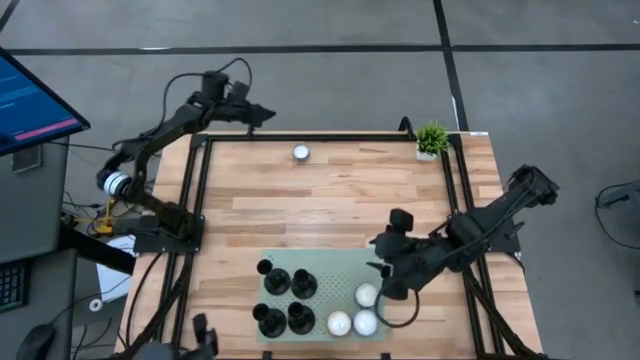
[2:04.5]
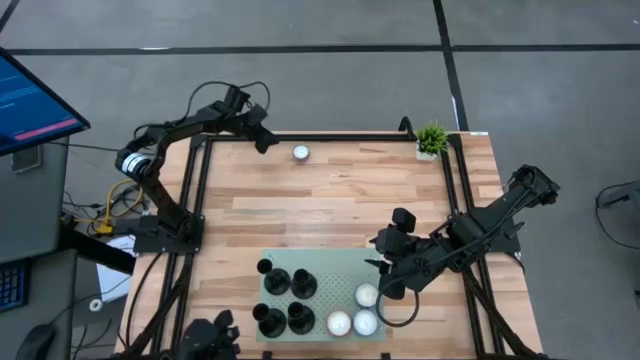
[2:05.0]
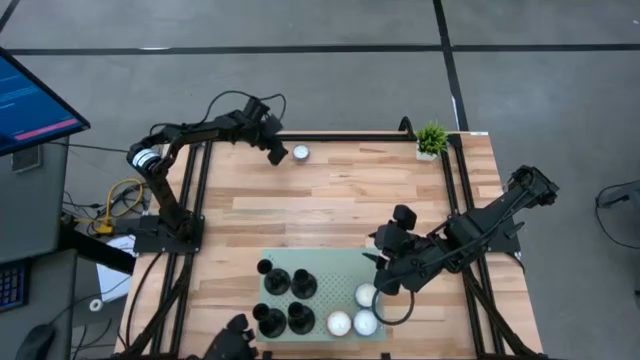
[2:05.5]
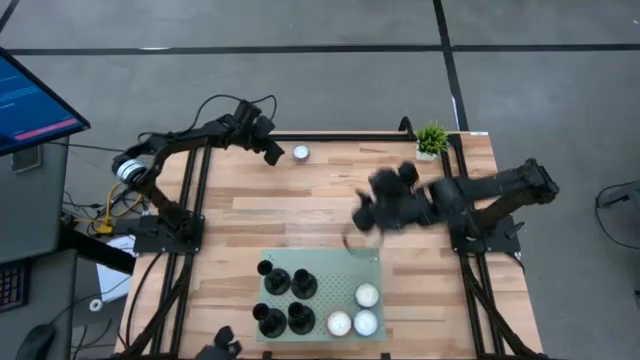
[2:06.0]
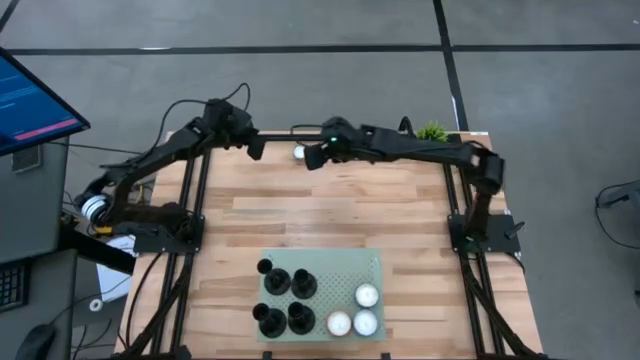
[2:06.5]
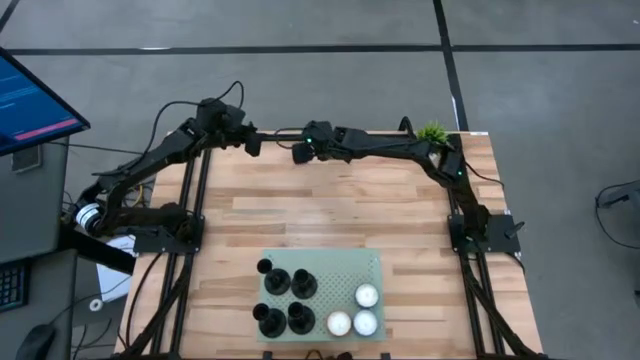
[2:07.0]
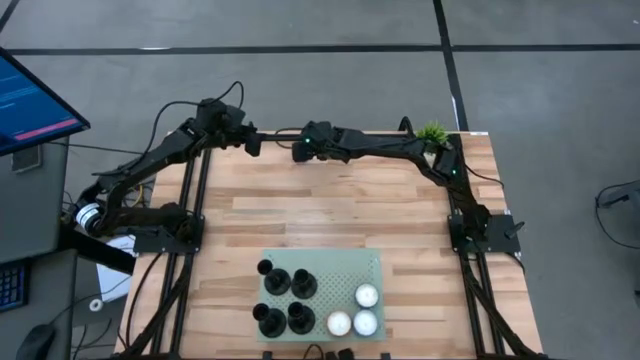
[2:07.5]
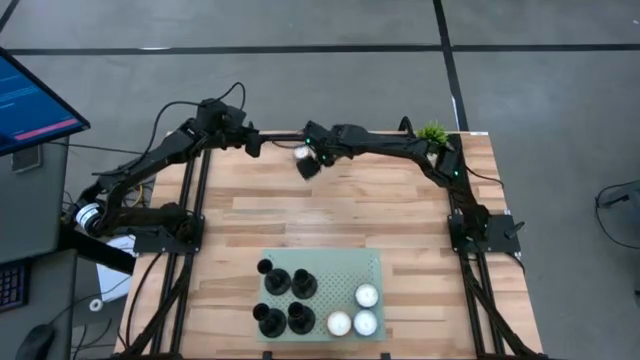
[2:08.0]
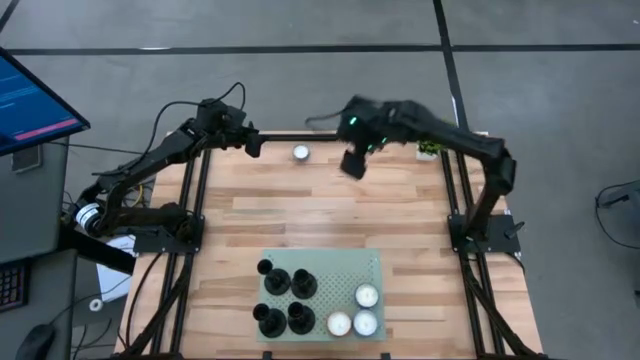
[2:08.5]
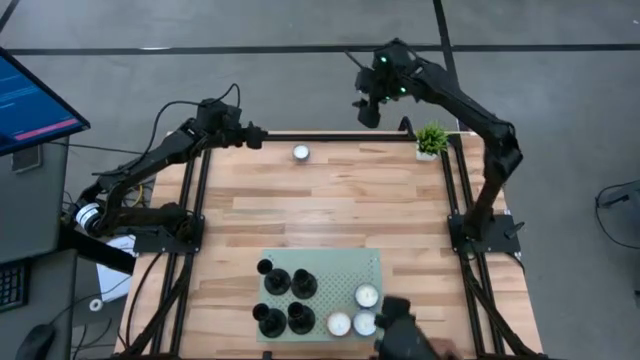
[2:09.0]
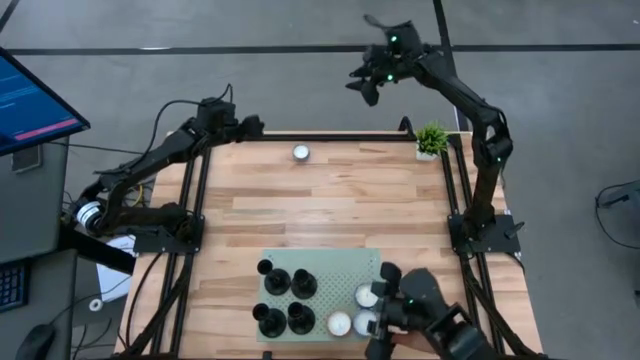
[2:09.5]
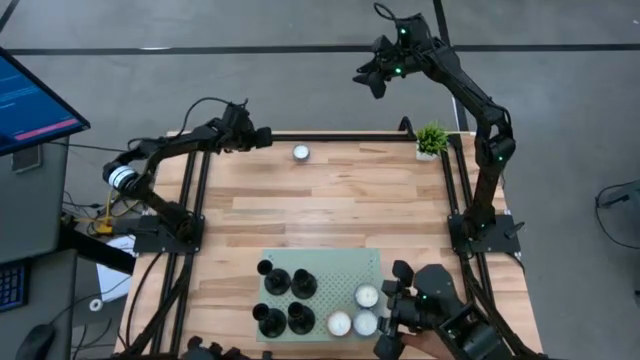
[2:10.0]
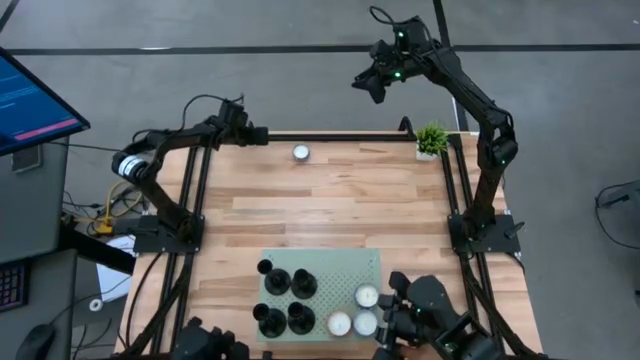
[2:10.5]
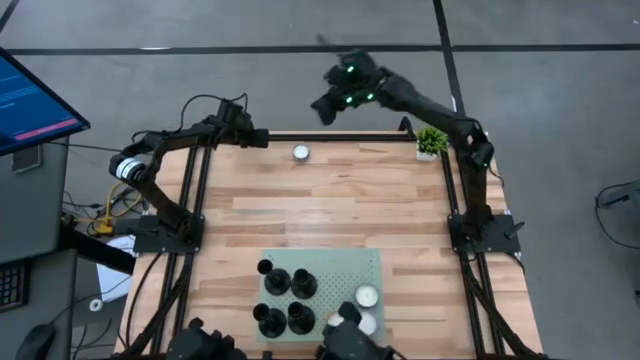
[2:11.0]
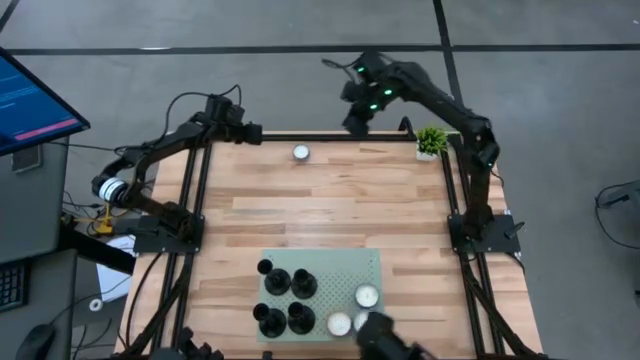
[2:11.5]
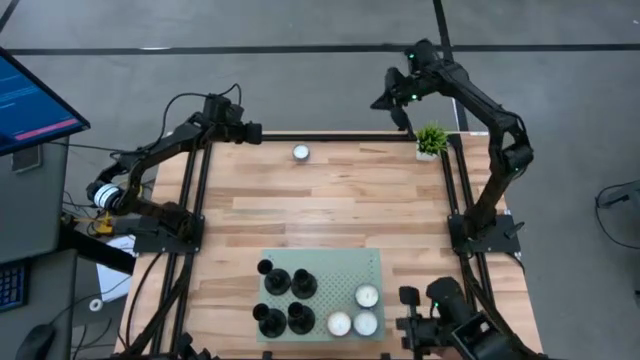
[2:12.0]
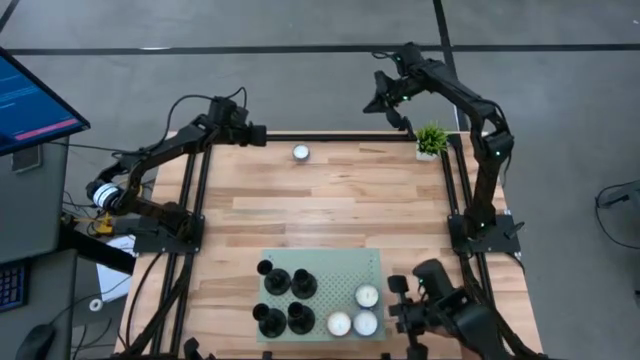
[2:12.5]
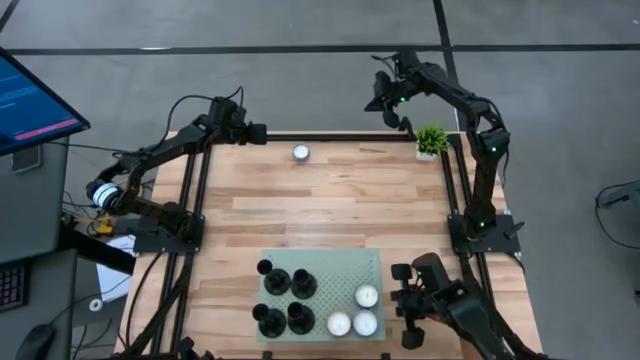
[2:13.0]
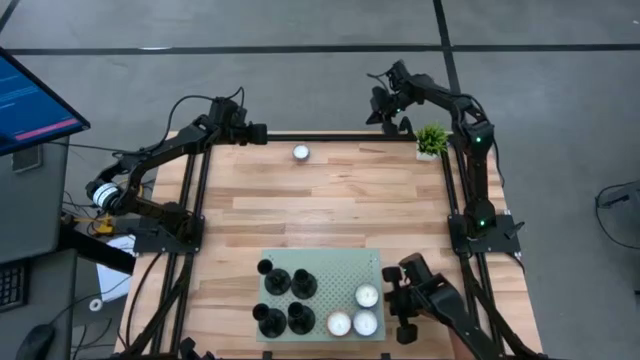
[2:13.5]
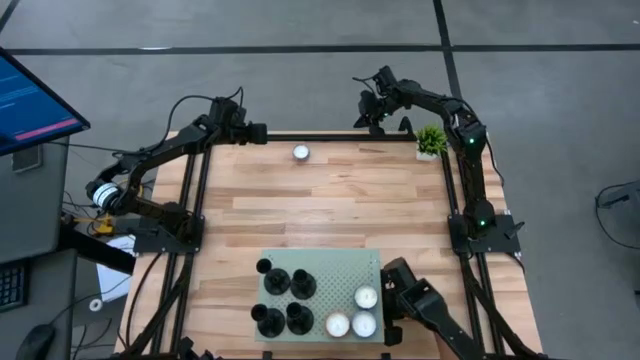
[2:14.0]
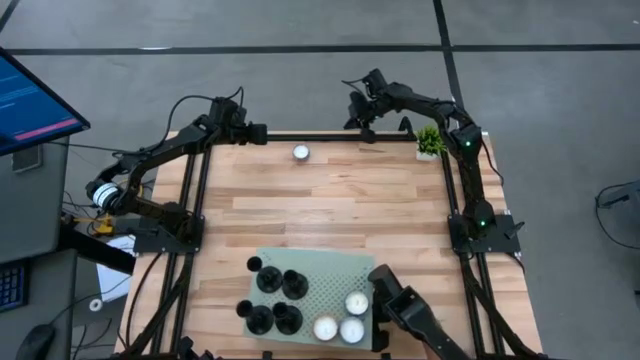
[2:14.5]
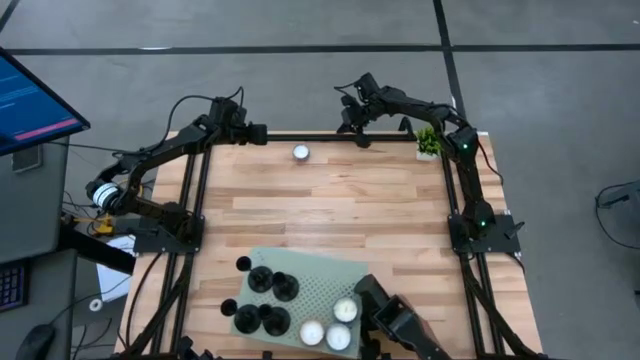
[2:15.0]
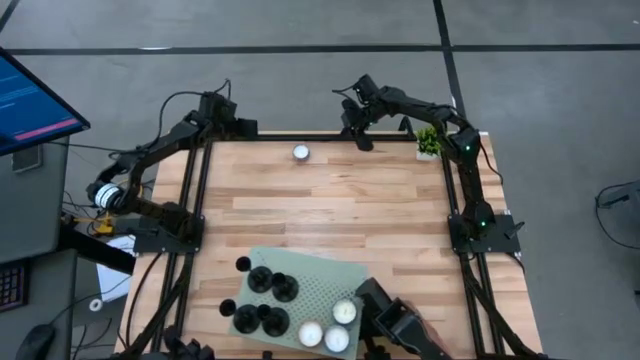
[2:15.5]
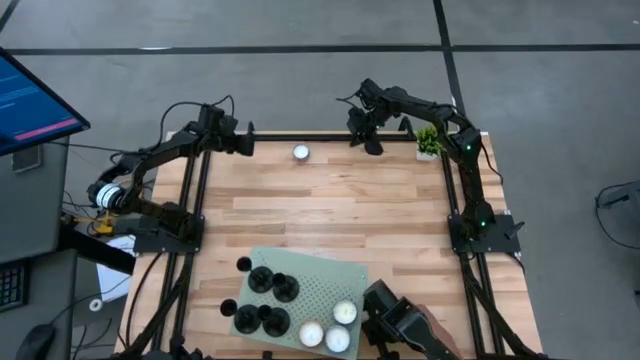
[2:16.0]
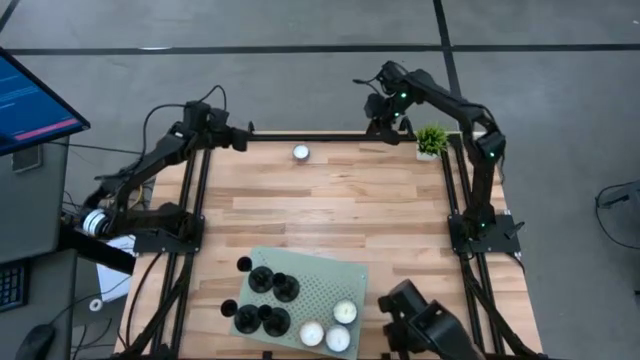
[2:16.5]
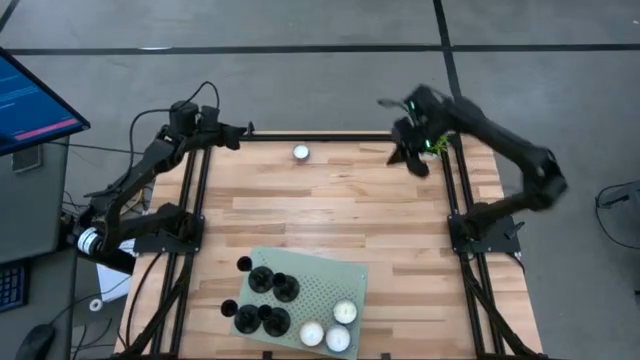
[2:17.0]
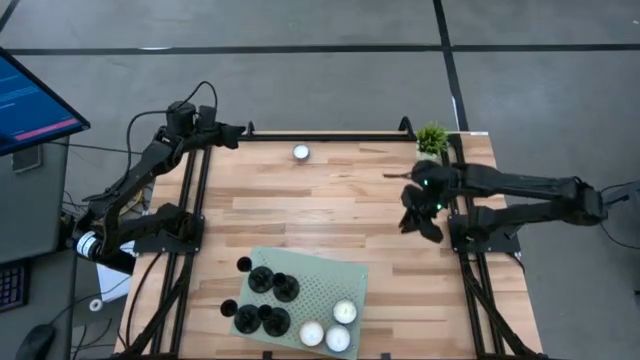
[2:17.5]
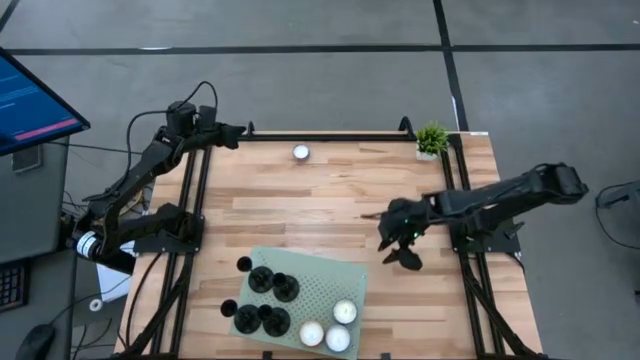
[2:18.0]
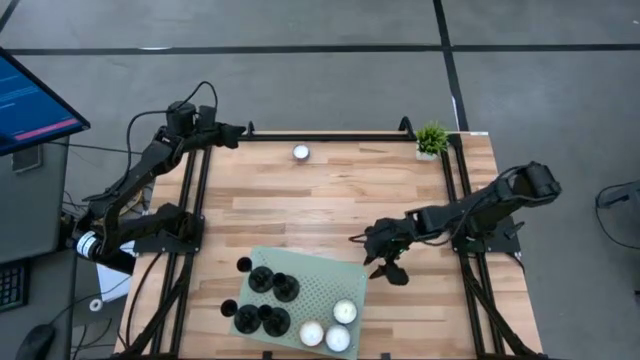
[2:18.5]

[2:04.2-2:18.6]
Task: Stock candles on shelf
Adjust the shelf

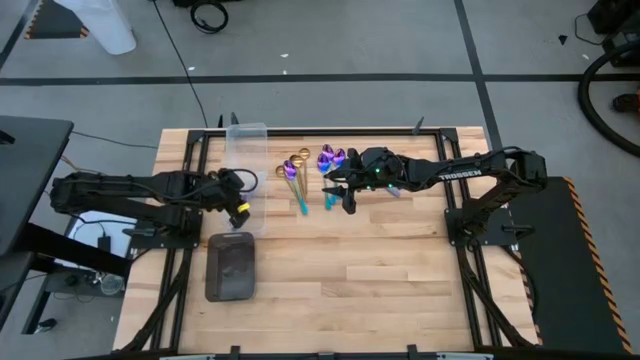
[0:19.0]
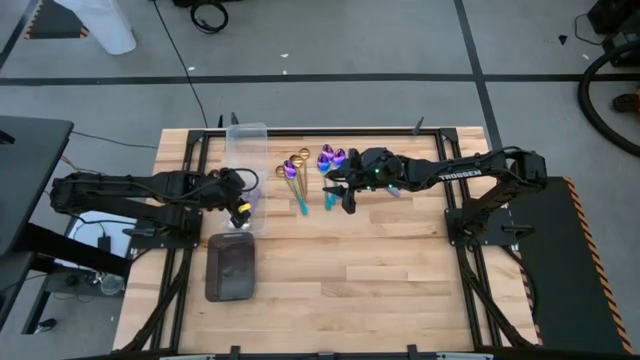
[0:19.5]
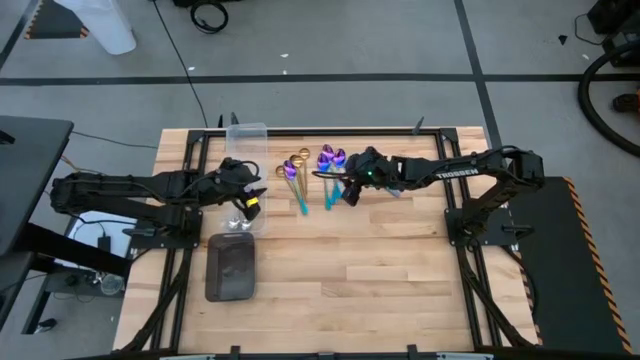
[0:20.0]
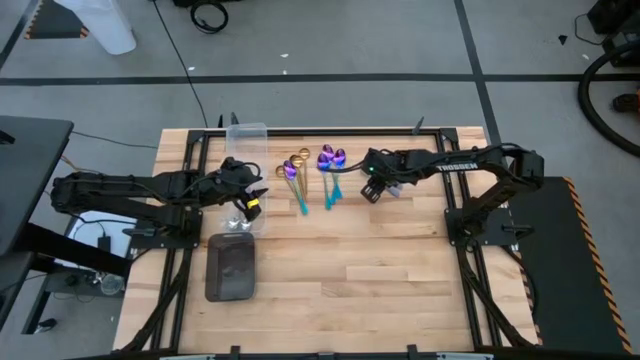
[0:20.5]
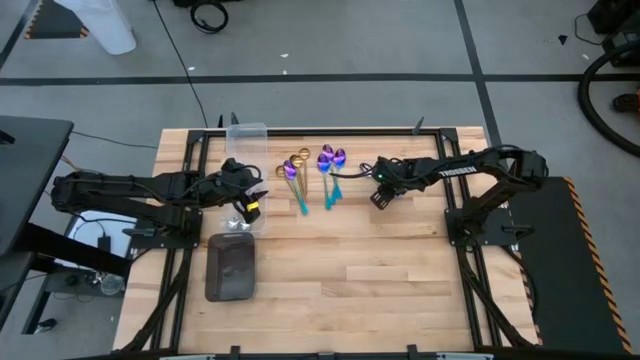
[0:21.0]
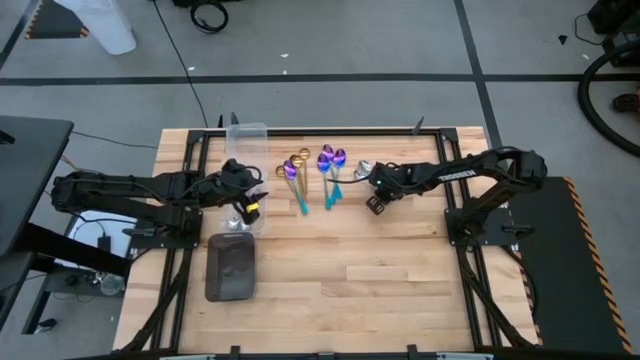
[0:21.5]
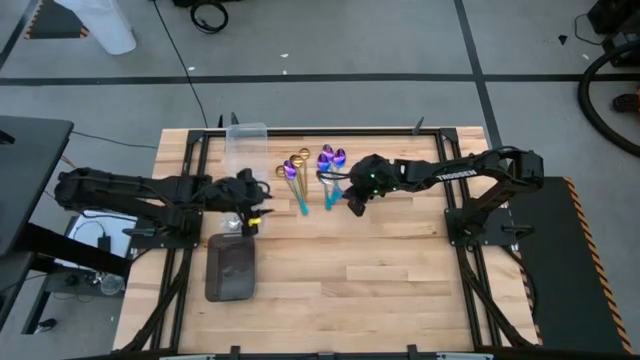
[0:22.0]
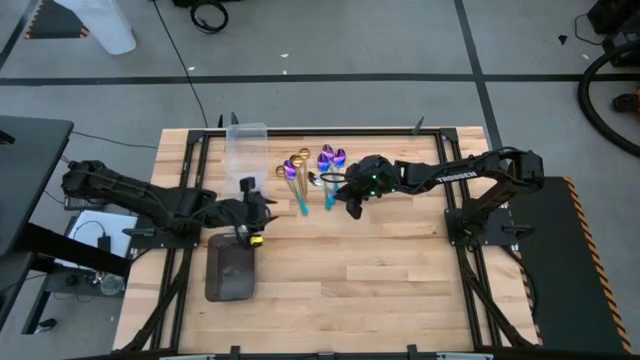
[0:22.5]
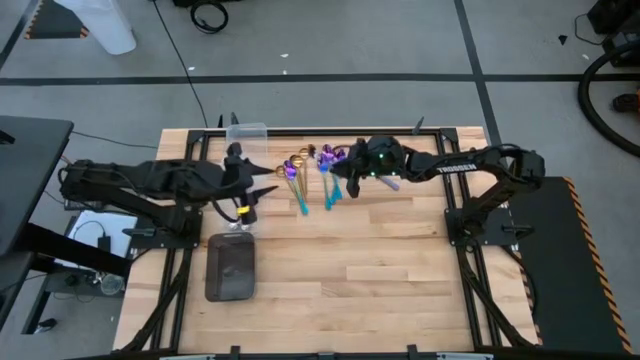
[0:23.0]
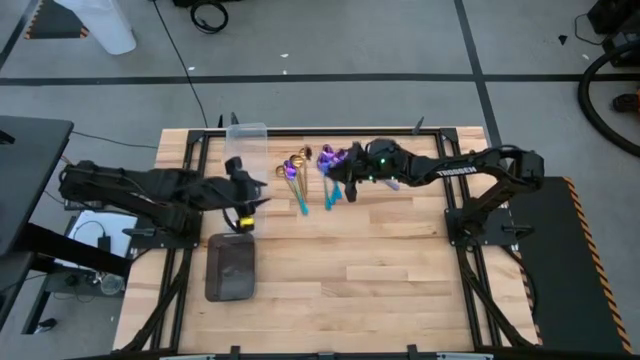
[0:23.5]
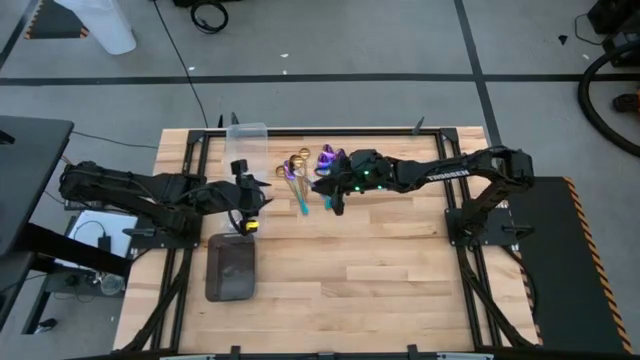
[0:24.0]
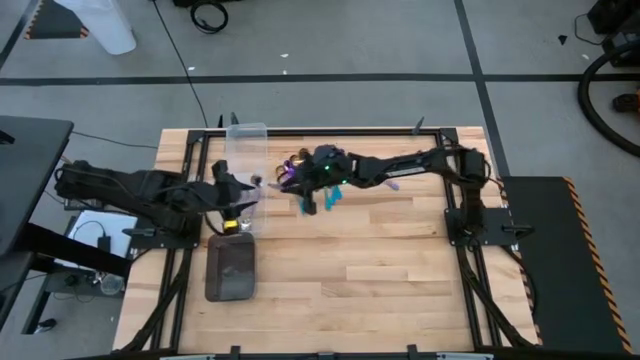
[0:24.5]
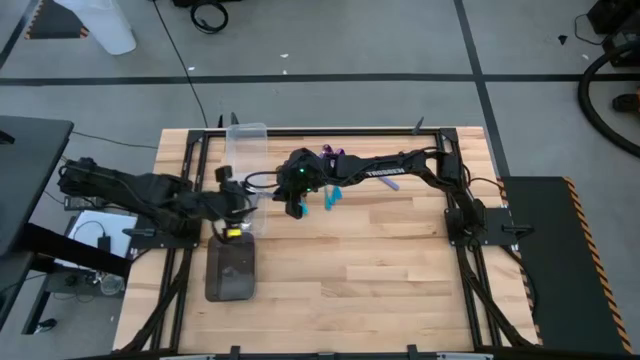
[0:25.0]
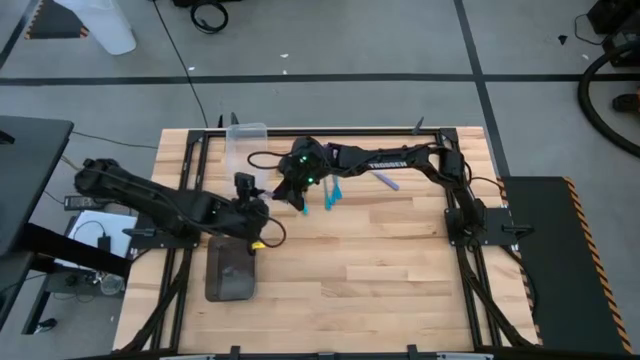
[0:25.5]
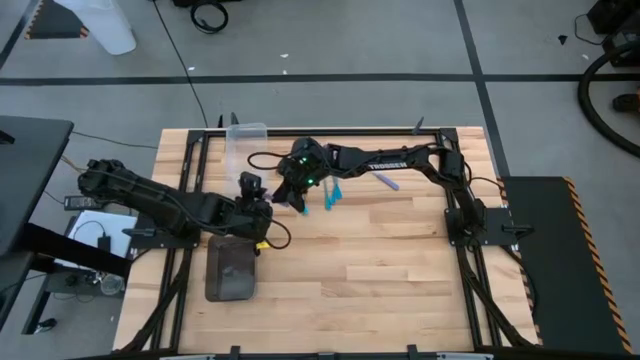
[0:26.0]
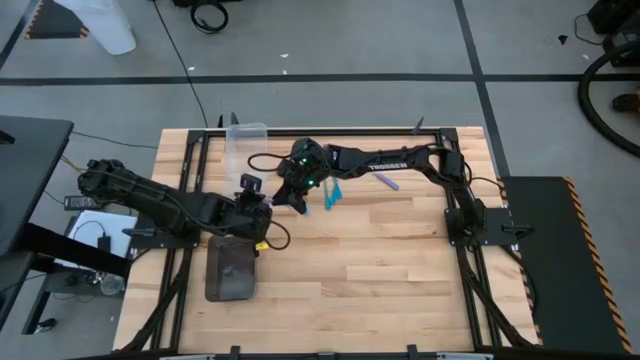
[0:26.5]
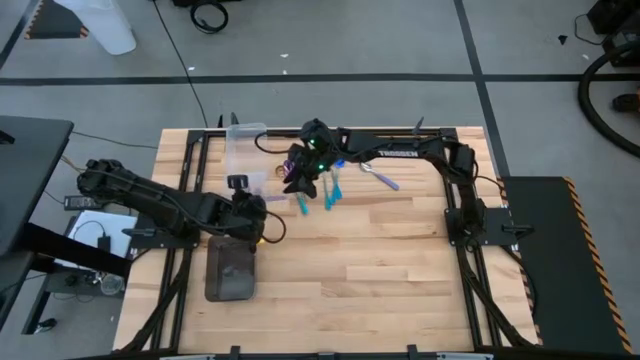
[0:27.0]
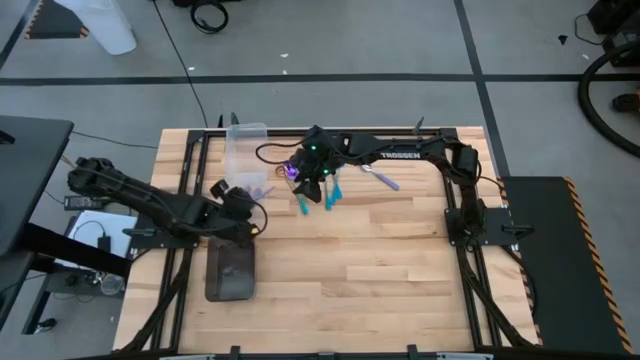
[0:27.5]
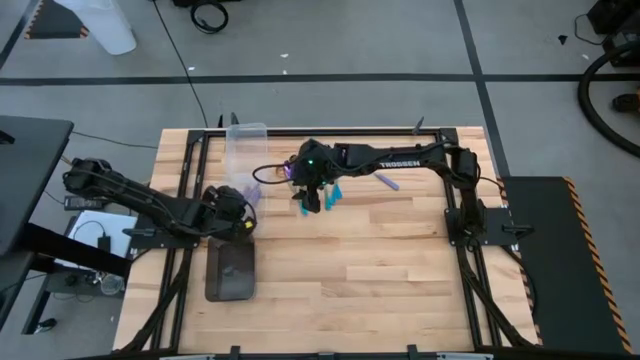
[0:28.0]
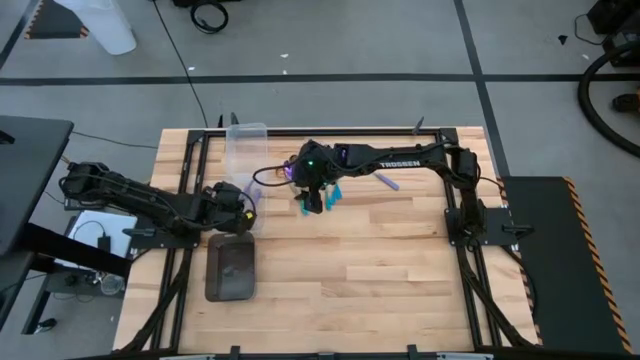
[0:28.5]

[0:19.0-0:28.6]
Task: Sort silverware by color (type)
Put the blue spoon into the bottom transparent bin
